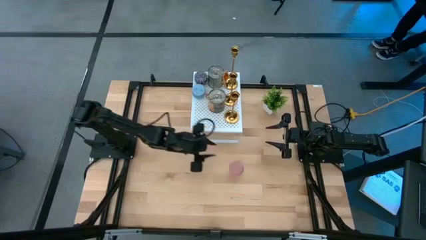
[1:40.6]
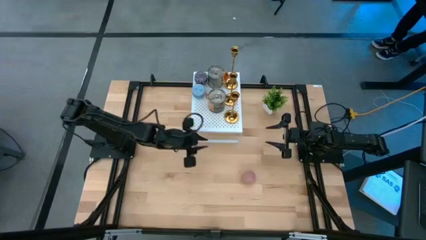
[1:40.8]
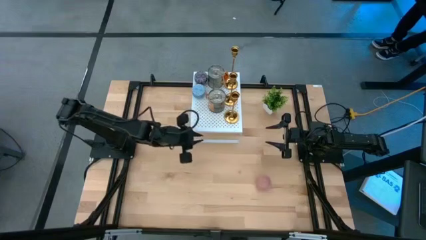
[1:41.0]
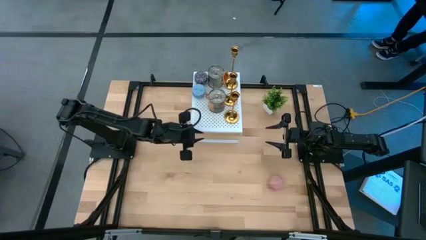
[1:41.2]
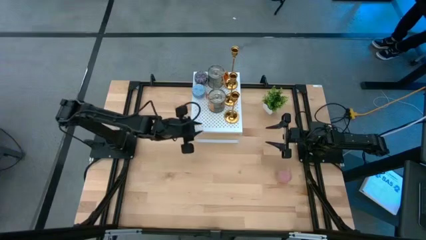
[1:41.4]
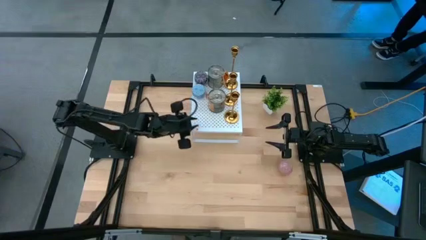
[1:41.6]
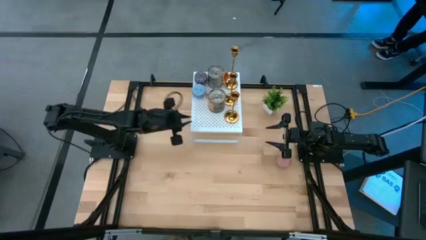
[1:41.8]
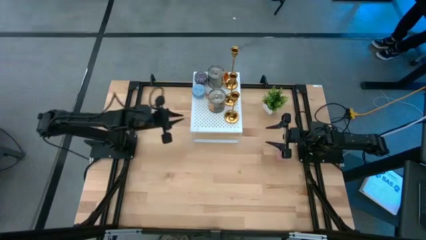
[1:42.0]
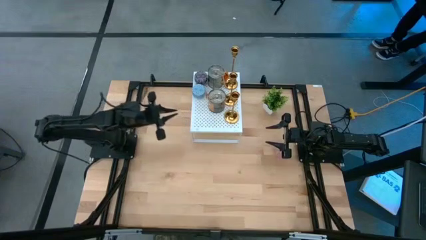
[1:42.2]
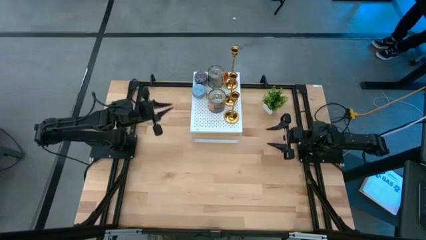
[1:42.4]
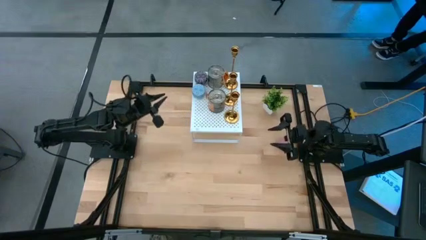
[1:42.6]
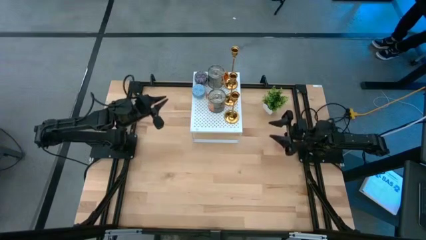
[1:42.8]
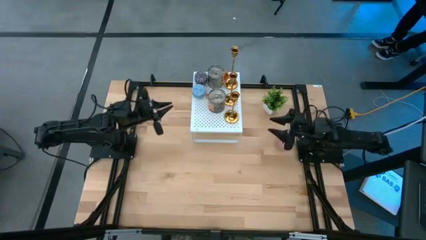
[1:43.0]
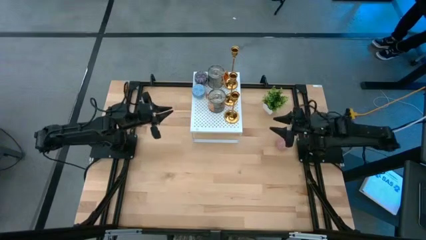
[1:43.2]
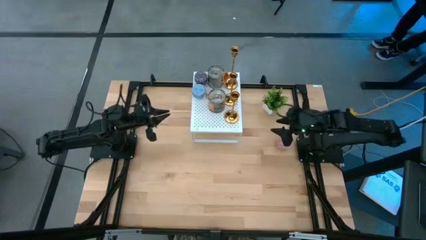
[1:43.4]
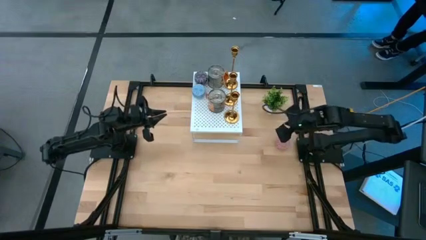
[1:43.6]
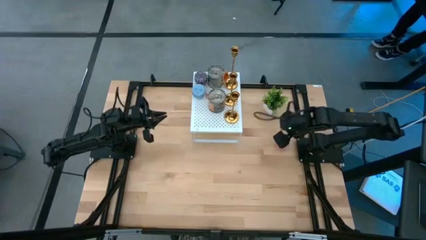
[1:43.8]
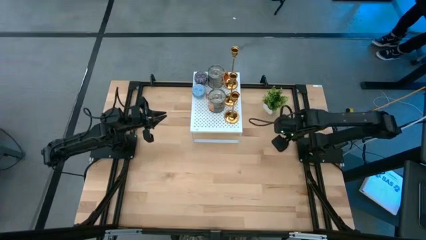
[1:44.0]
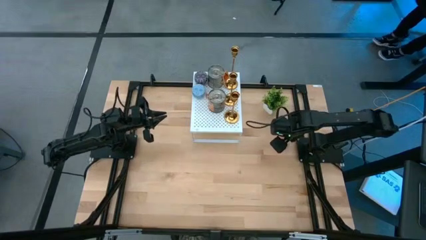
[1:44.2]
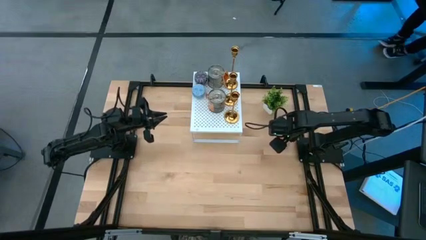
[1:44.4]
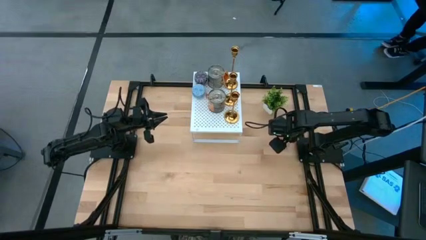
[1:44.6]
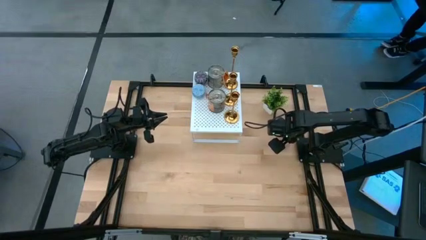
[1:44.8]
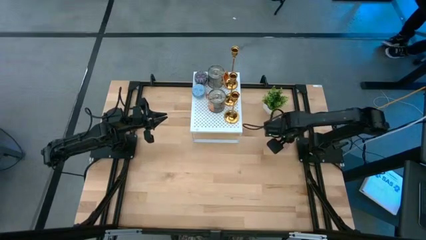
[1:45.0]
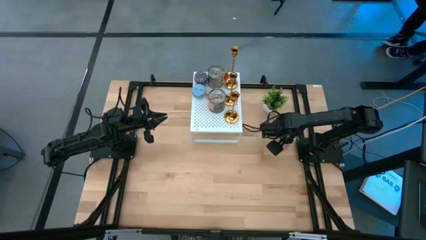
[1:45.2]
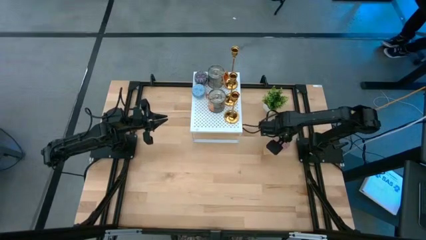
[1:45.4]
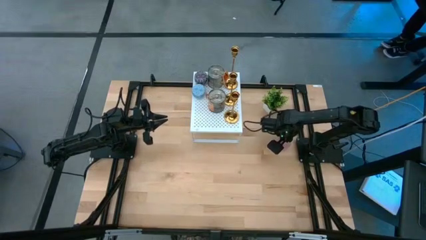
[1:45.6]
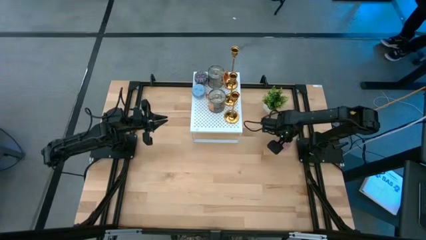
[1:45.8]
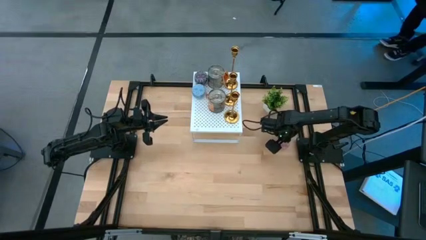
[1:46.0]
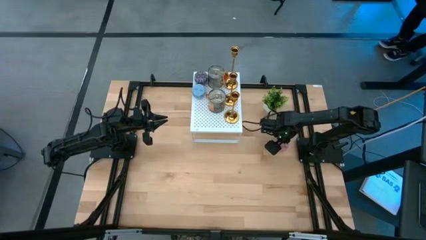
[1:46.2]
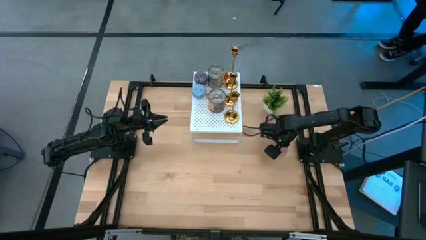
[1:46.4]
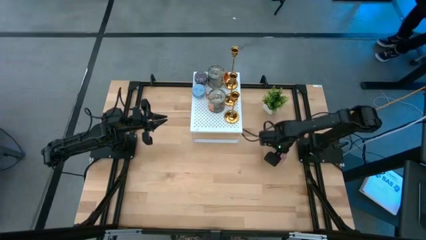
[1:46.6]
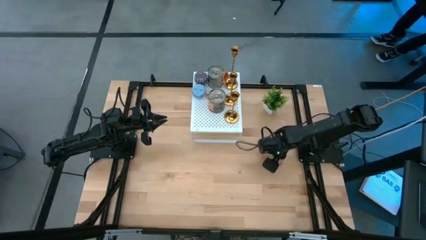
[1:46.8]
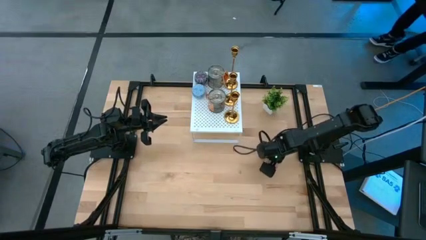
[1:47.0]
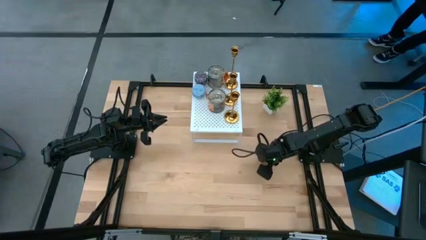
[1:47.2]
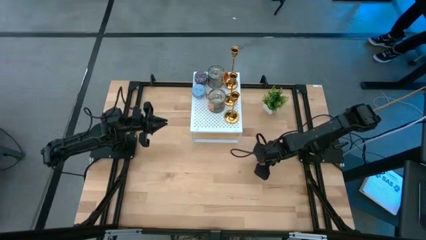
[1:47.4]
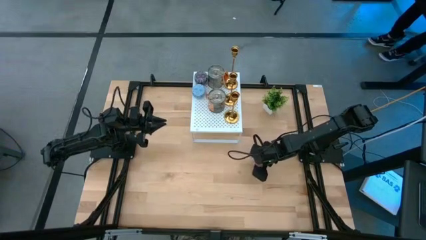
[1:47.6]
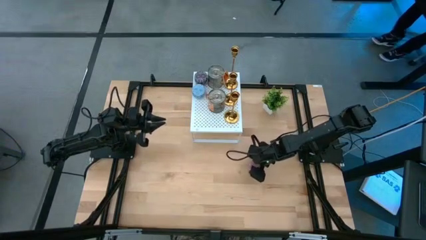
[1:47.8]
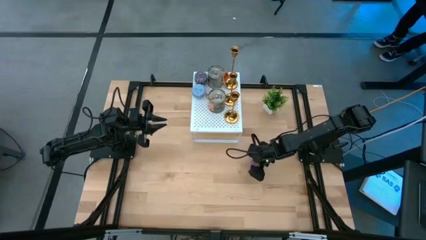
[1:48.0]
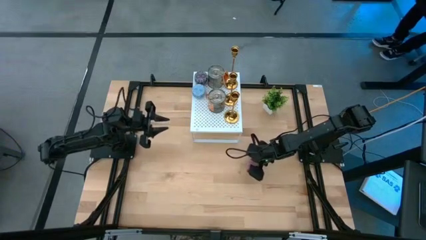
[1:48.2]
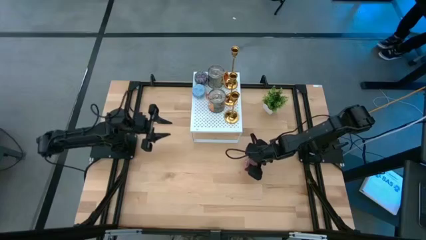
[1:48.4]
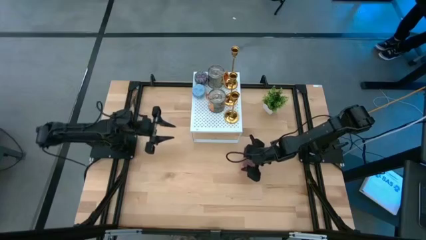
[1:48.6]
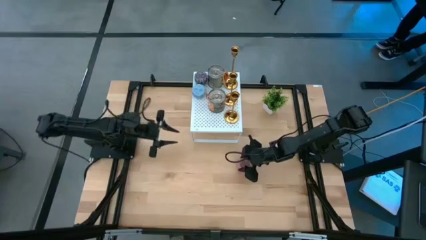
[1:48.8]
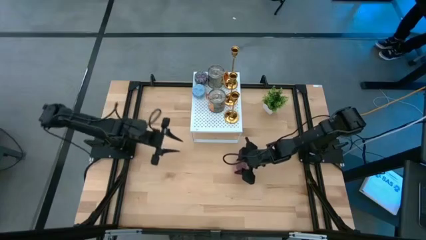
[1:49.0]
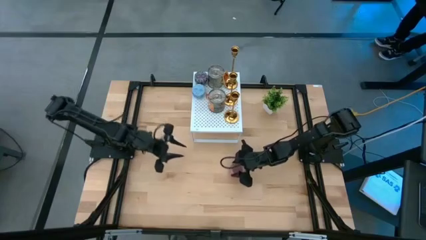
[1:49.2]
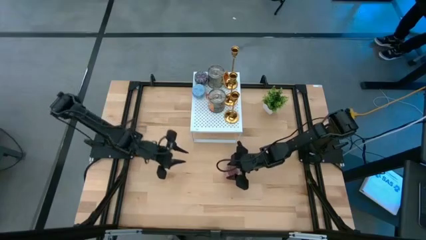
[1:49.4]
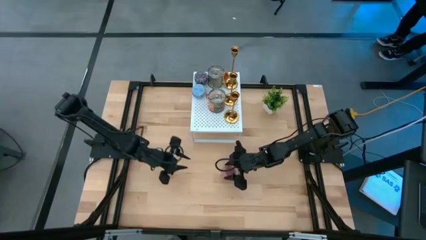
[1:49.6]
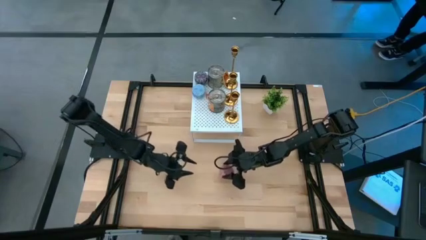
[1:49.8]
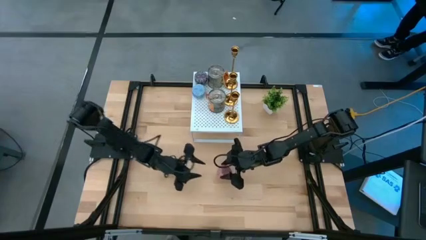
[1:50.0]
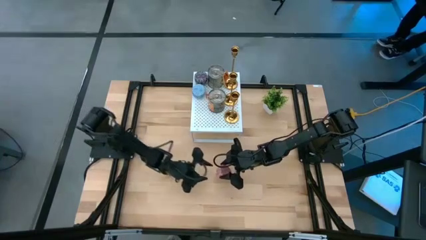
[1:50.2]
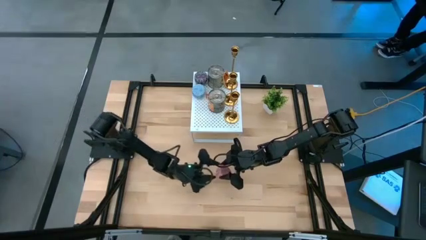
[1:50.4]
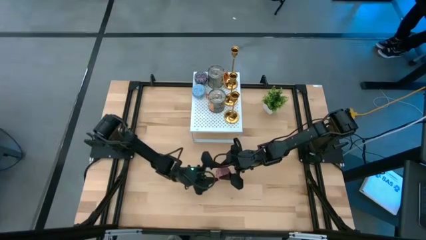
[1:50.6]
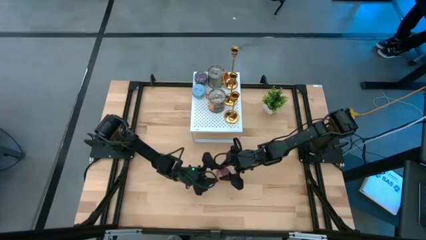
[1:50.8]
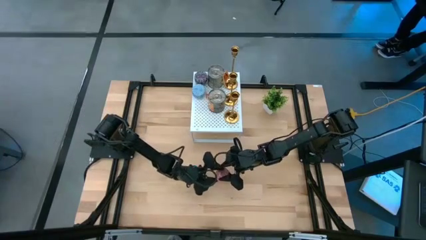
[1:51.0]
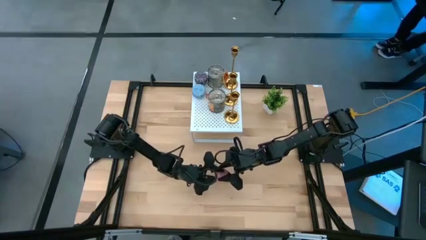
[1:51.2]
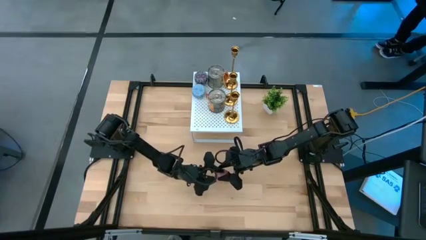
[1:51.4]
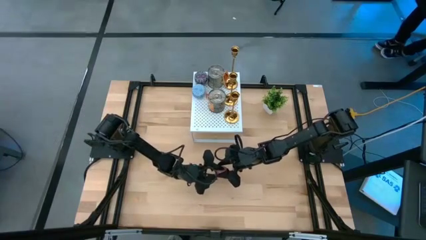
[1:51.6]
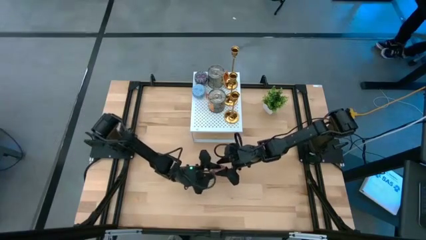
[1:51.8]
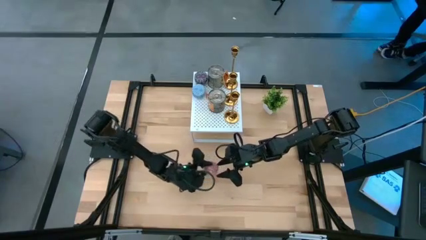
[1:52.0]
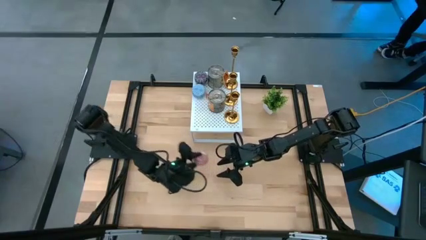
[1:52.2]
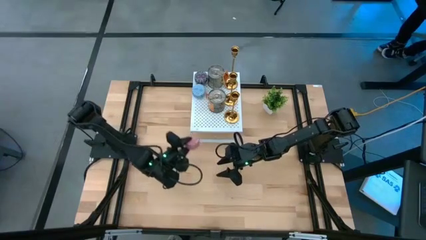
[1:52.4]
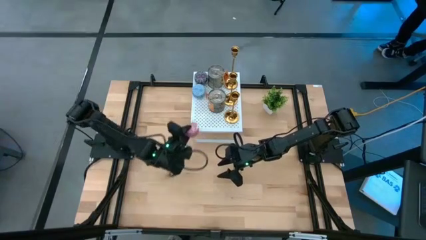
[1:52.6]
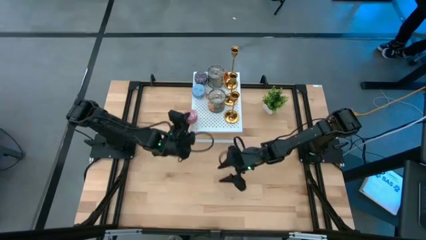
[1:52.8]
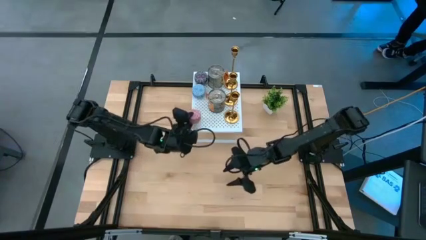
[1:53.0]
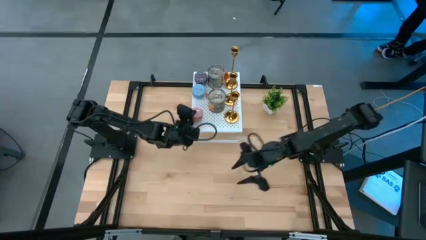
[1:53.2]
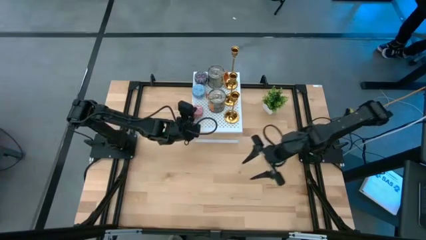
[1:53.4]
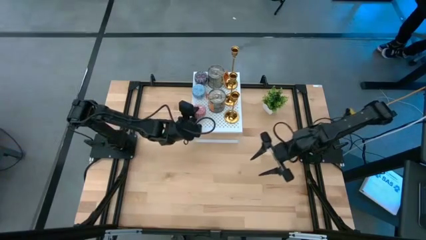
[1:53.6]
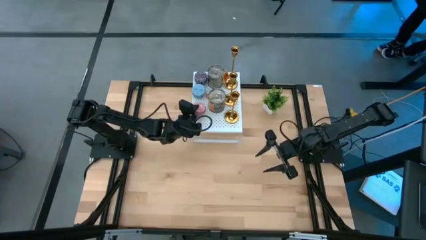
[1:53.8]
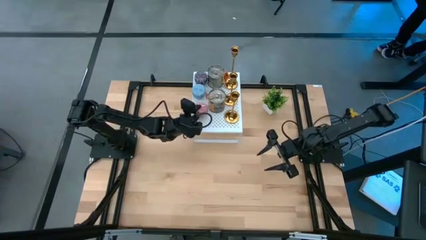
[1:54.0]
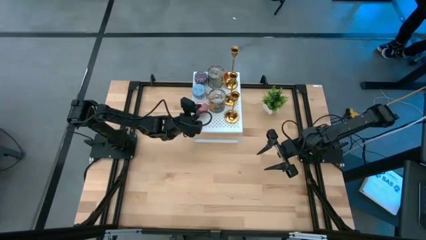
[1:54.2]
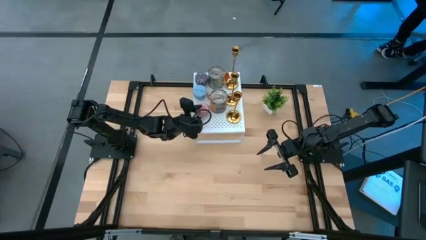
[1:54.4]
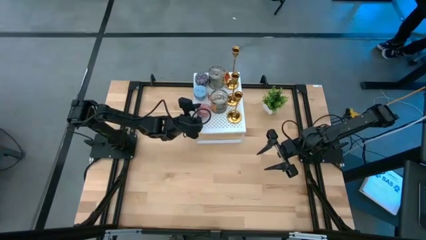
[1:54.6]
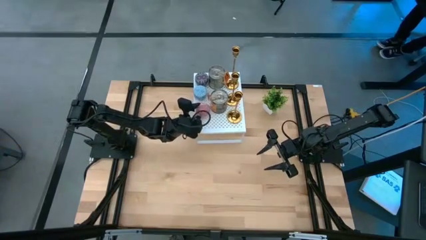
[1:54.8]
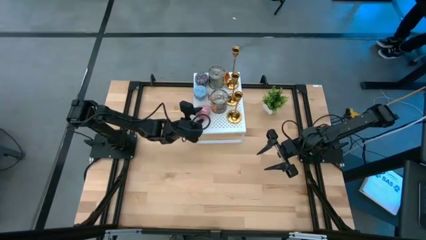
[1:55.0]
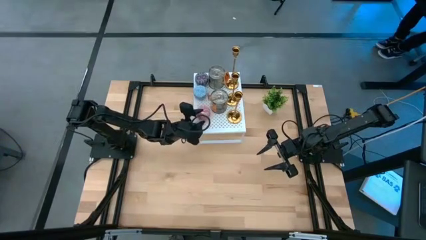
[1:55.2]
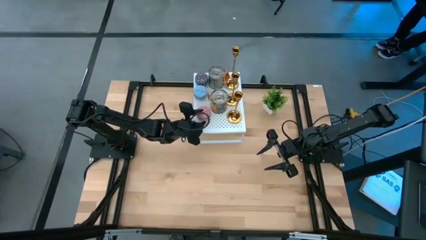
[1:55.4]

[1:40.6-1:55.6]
Task: Pick & Place candle stick holders
Put the pink patterned scented candle on the shelf

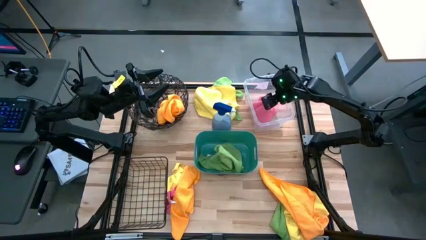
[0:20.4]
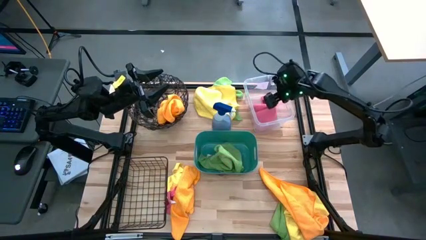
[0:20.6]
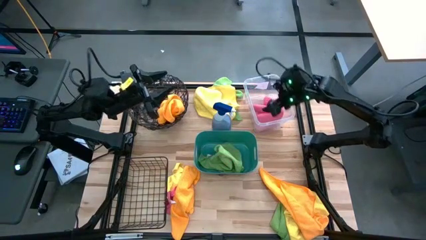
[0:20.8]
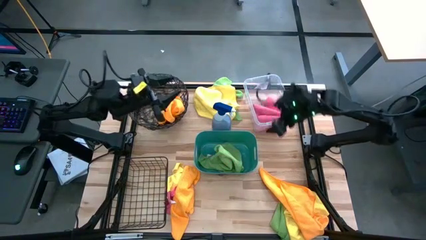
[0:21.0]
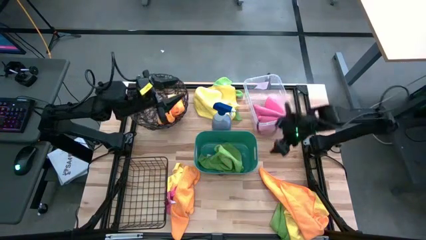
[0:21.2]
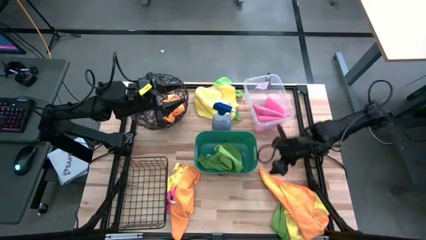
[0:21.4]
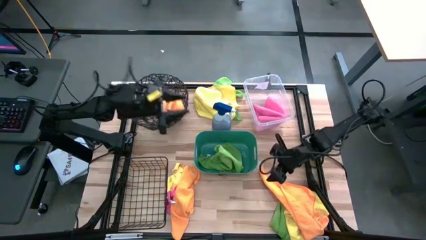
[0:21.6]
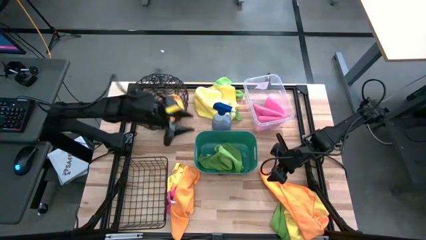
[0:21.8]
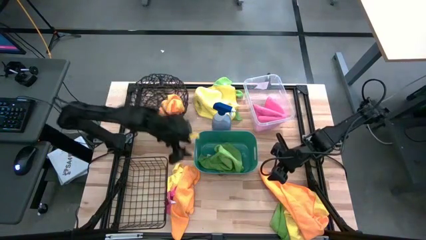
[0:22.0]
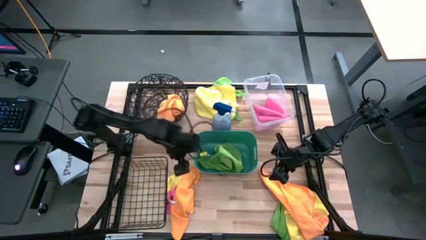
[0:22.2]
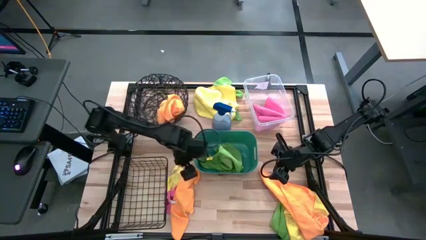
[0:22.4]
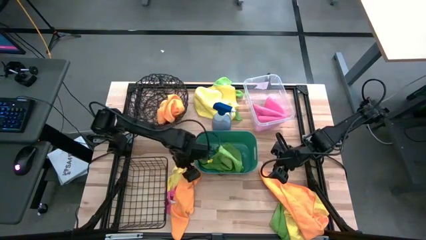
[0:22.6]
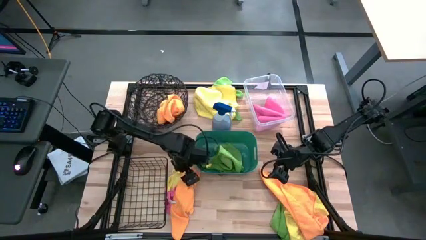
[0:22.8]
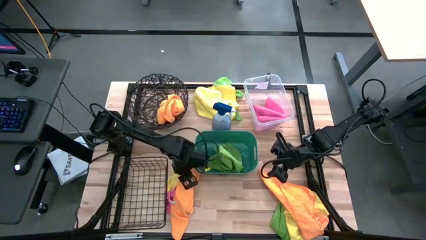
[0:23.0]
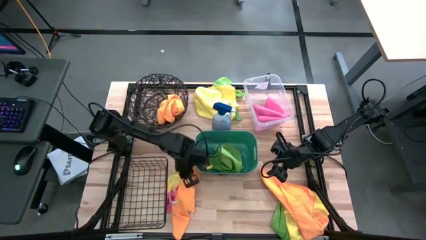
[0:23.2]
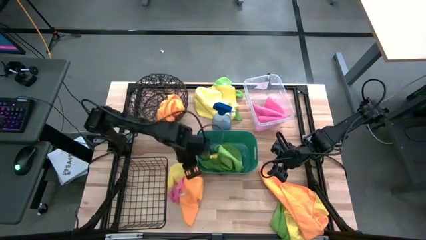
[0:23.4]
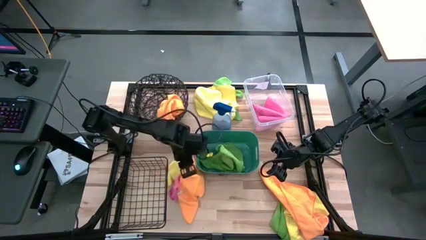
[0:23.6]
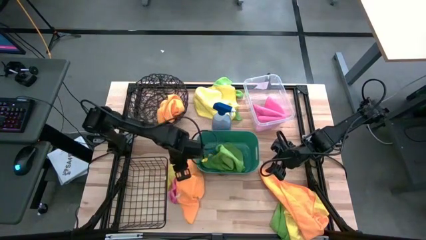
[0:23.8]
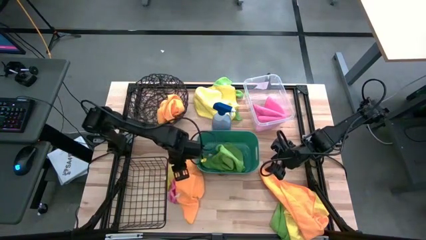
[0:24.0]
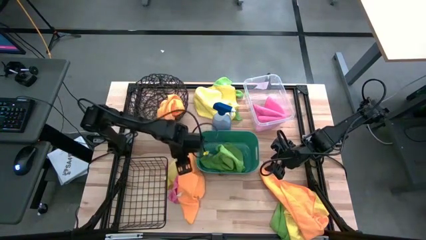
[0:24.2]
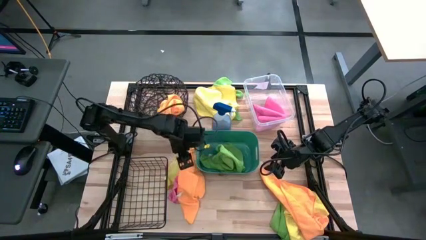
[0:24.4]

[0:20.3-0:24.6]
Task: Sort microfiber towel by color & place in baskets
Put the orange towel into the circular wire basket
